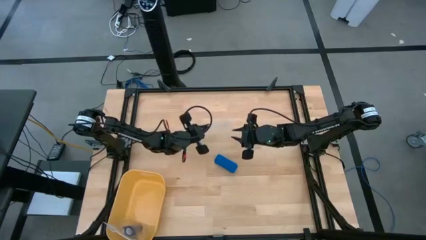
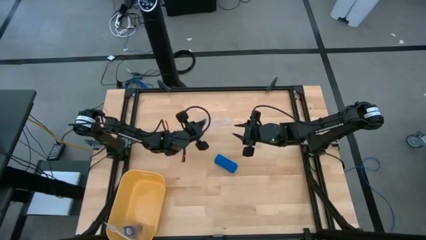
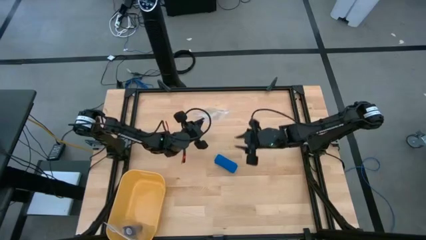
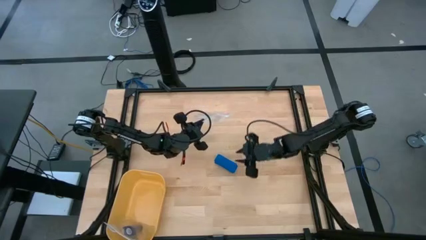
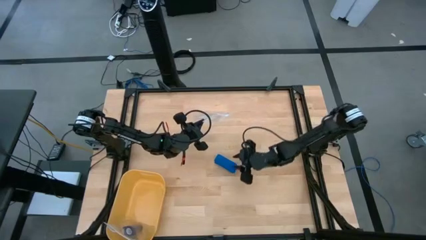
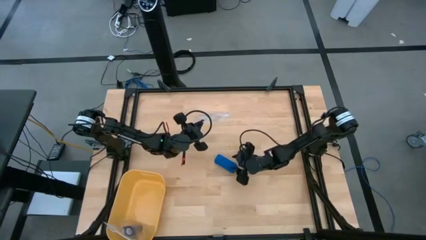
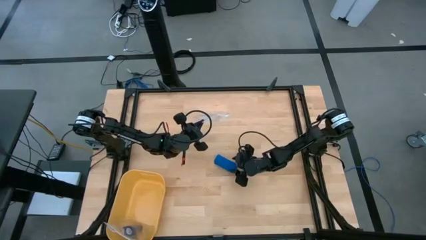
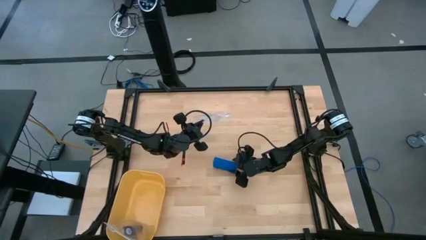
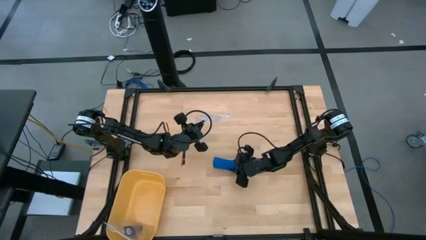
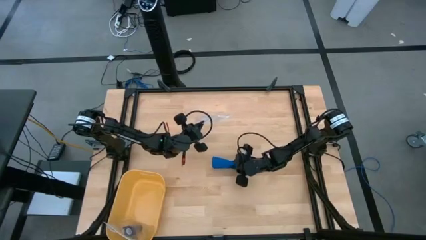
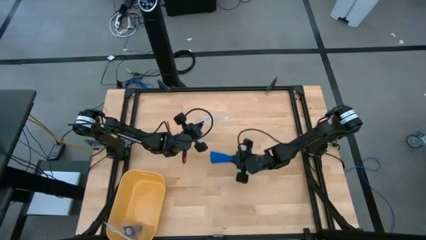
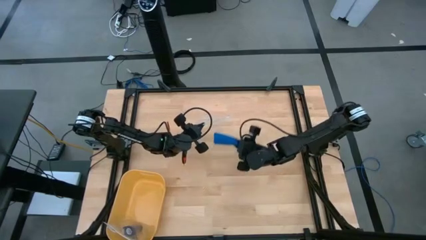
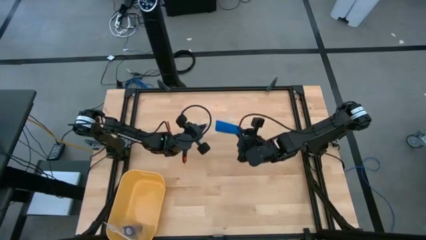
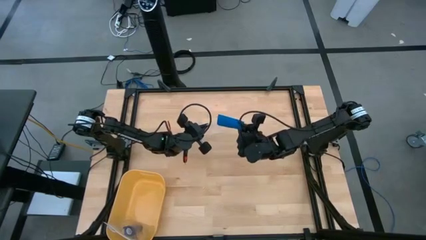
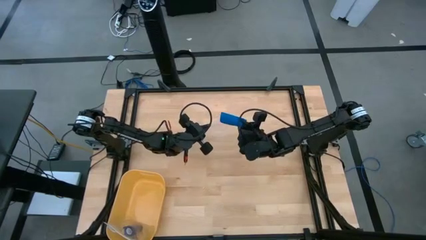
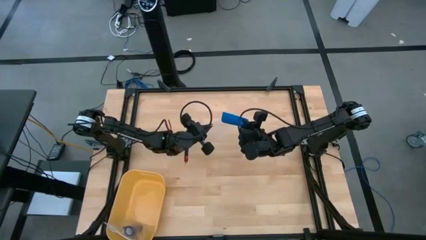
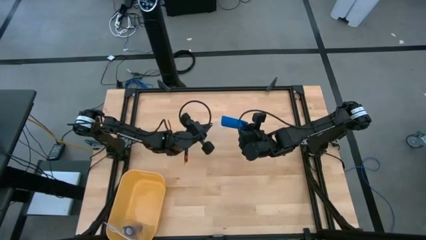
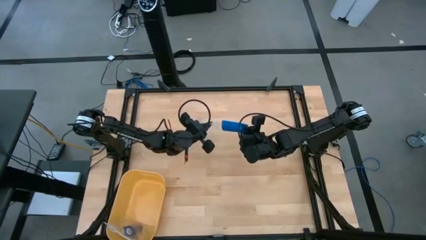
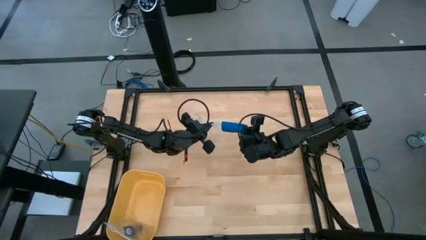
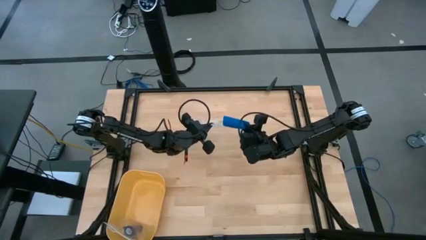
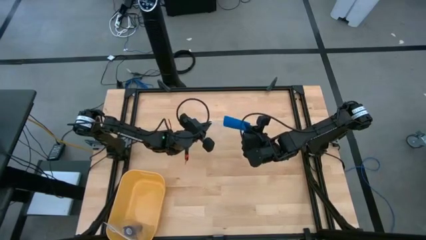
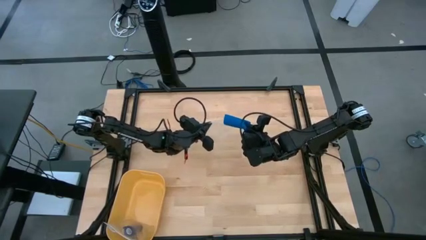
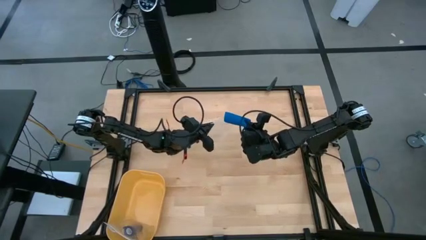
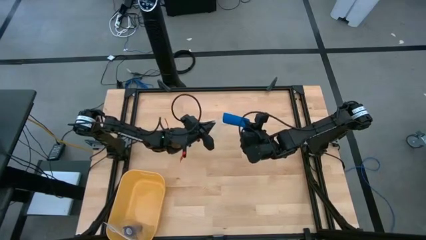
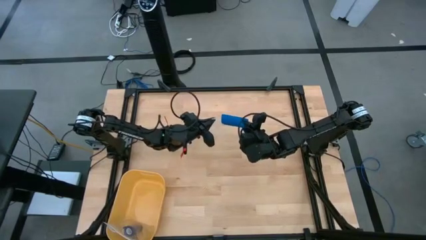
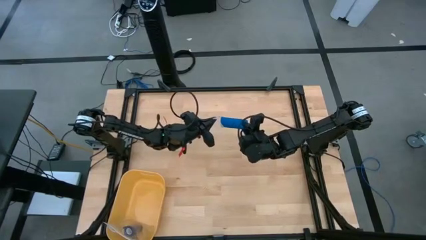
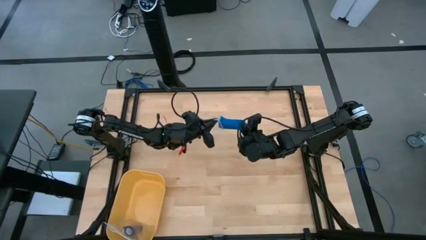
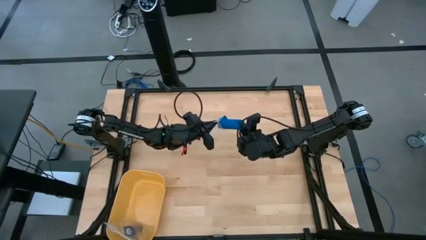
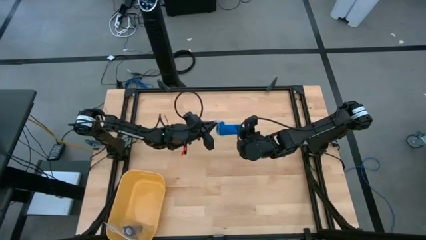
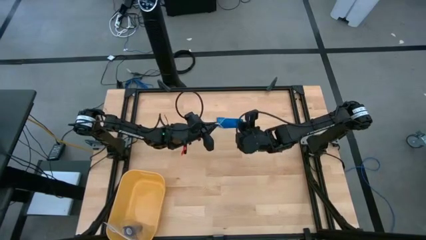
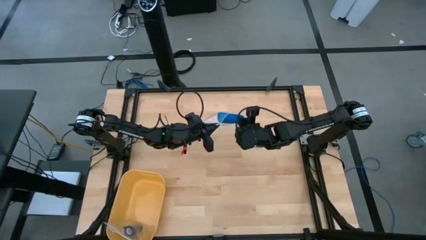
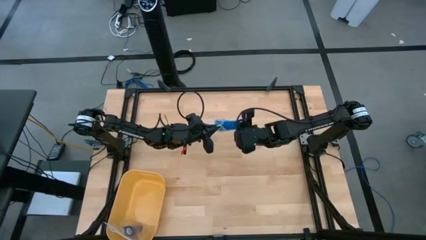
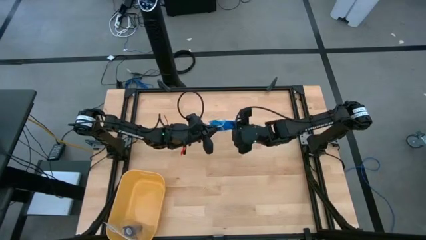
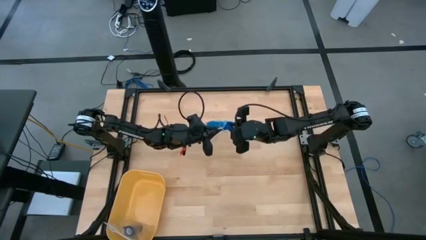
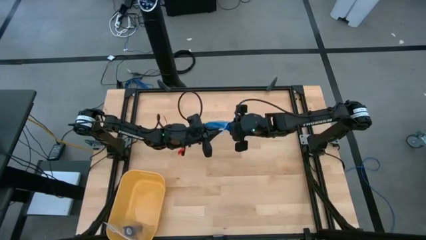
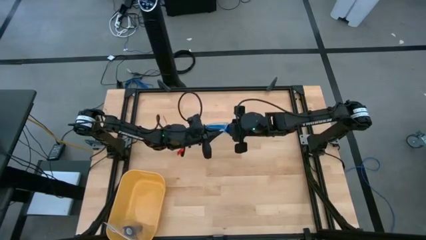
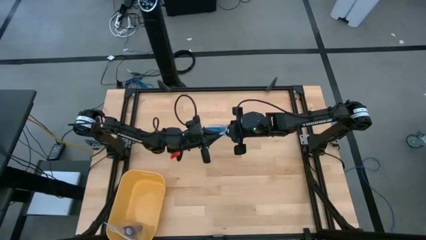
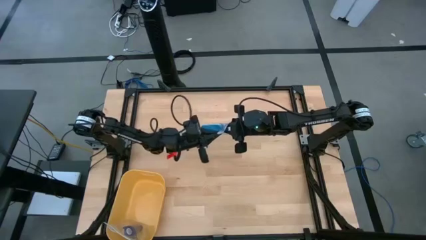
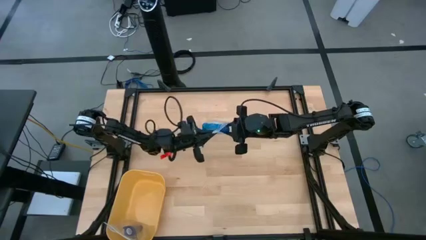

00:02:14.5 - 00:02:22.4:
Task: Roll bandage
Put the blue bandage into the zip bag

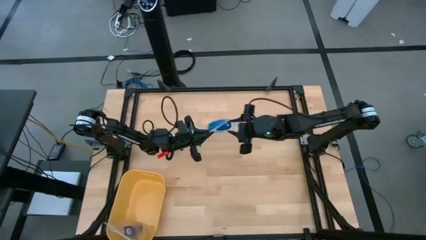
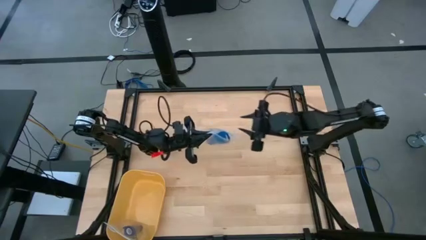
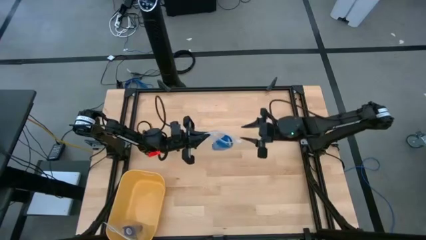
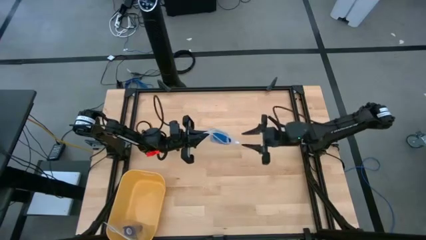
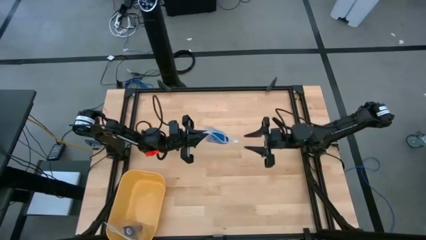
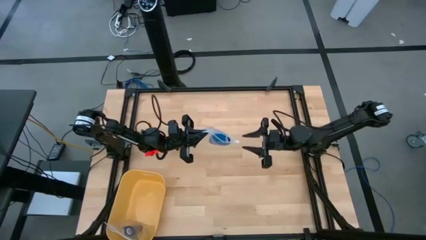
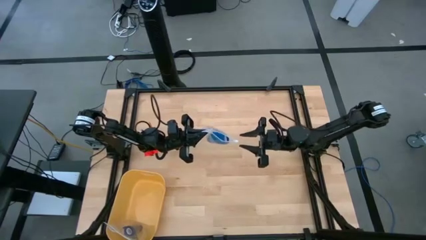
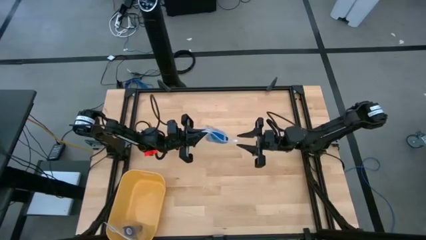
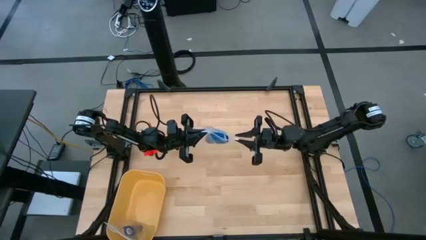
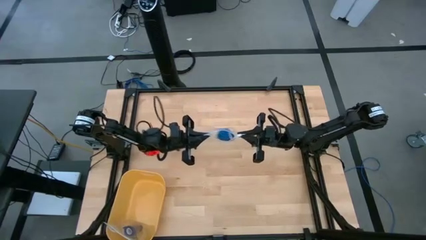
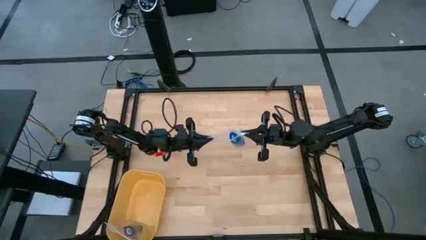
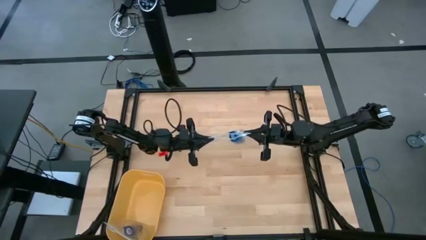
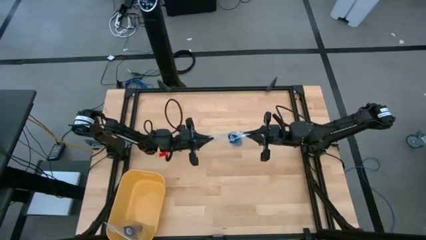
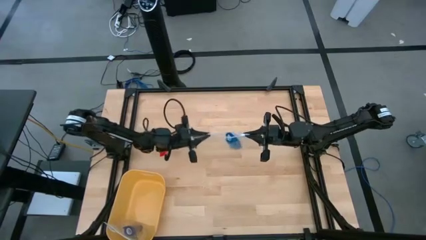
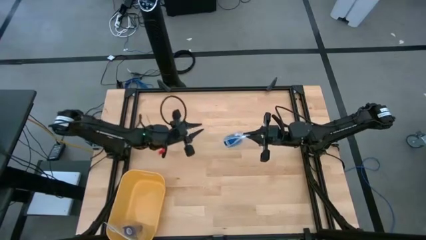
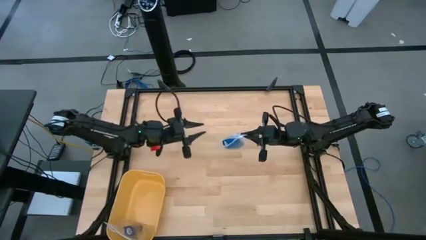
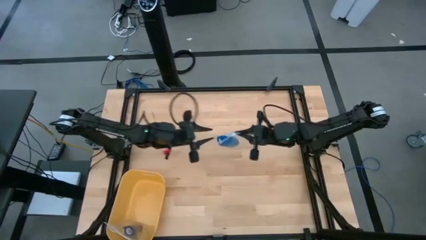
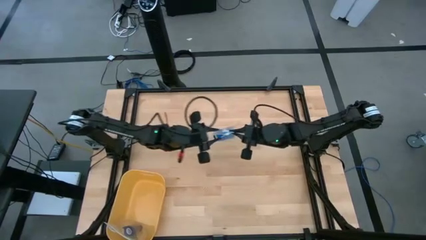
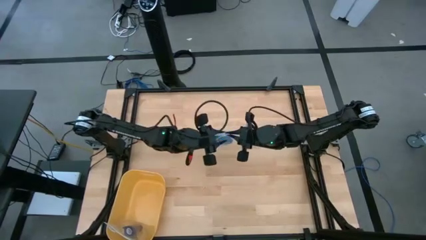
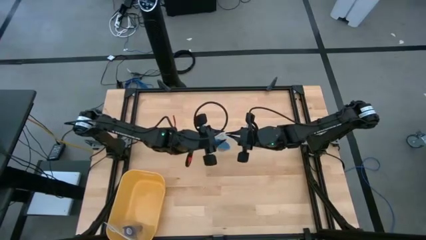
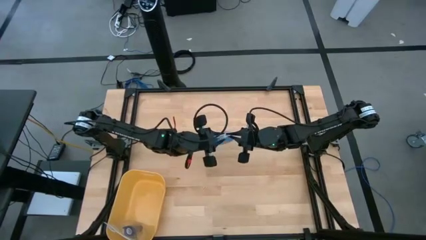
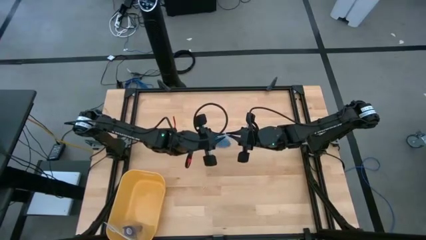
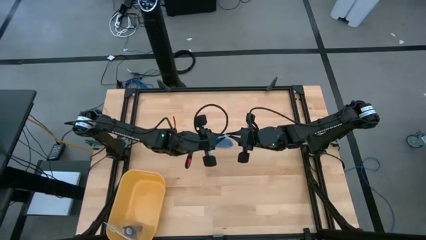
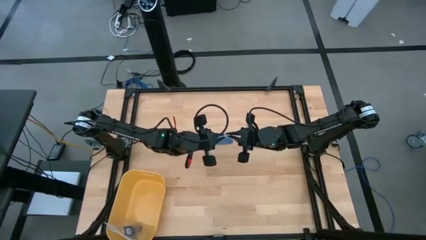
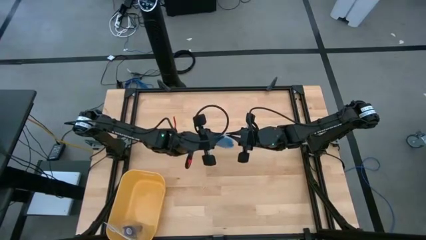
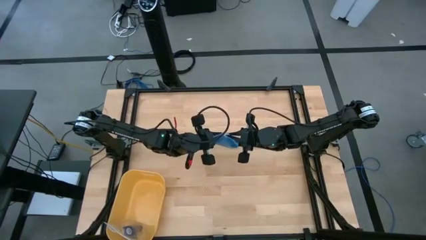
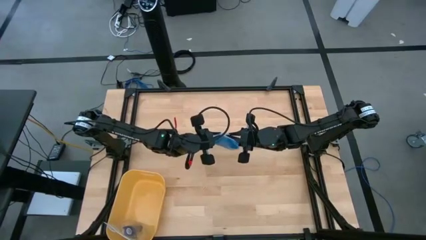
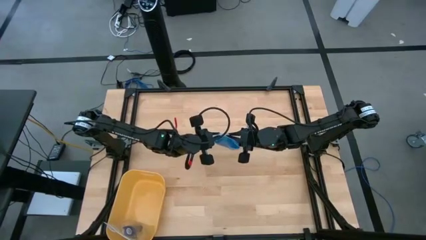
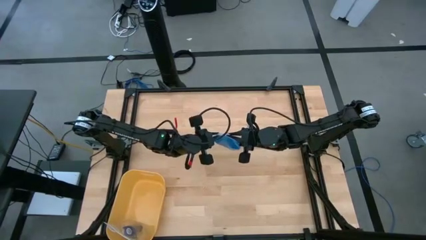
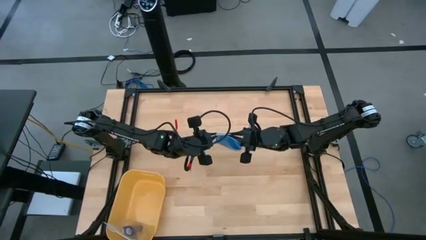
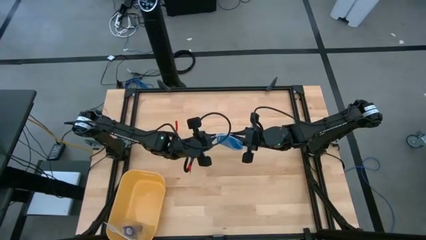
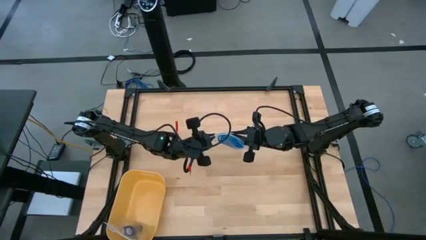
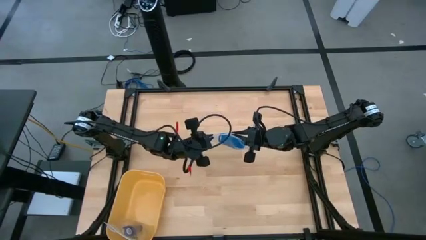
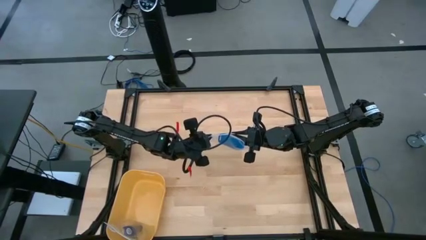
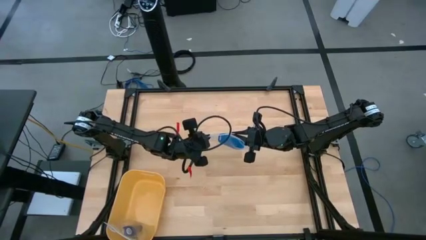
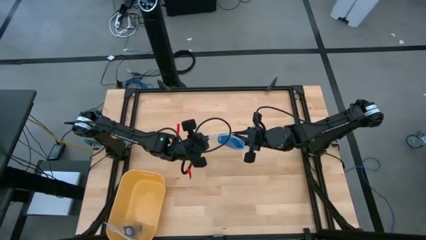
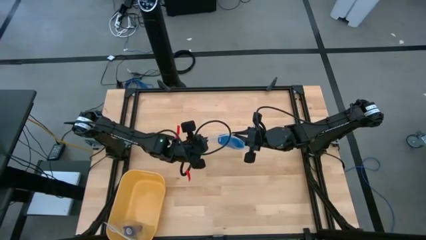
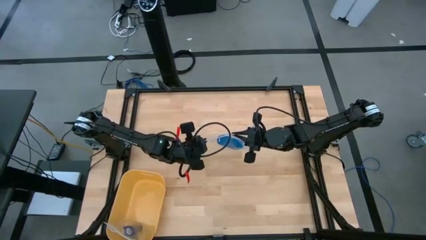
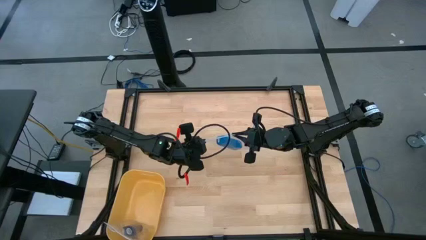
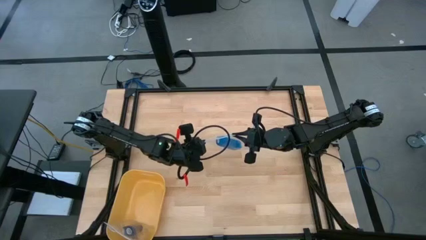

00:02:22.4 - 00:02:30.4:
Close the zip bag
